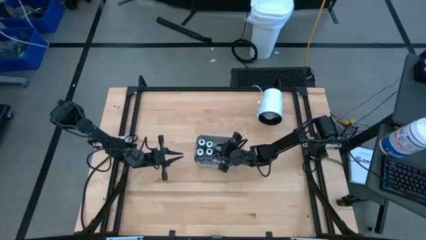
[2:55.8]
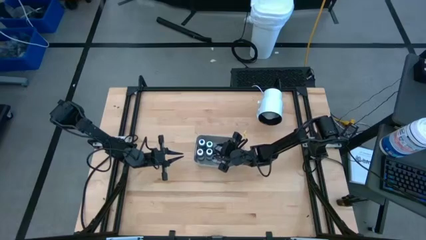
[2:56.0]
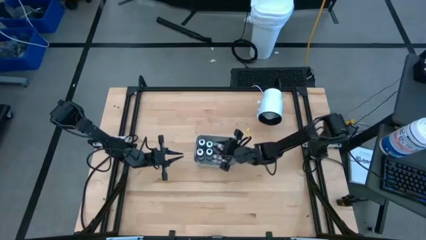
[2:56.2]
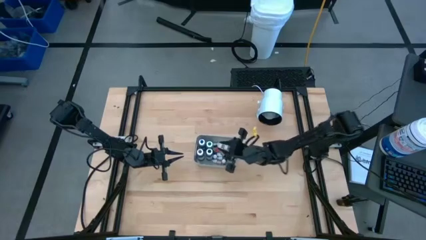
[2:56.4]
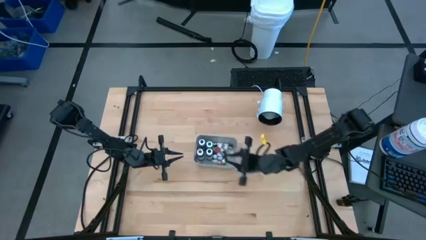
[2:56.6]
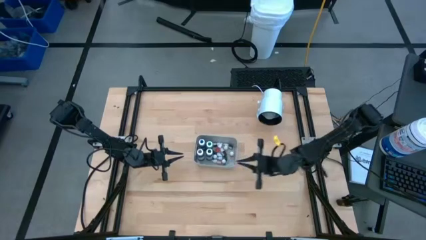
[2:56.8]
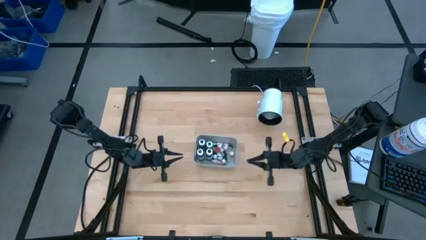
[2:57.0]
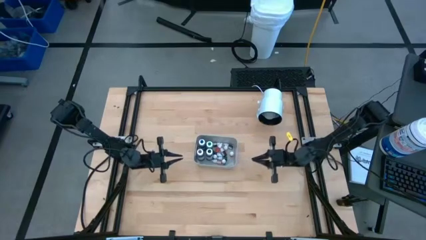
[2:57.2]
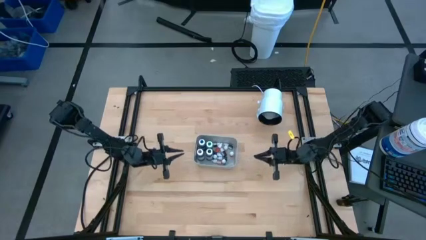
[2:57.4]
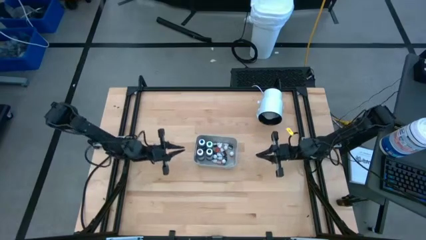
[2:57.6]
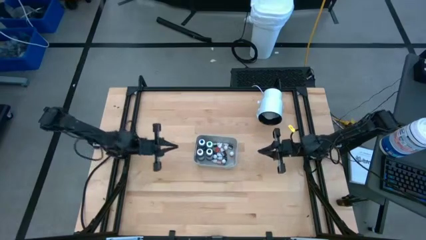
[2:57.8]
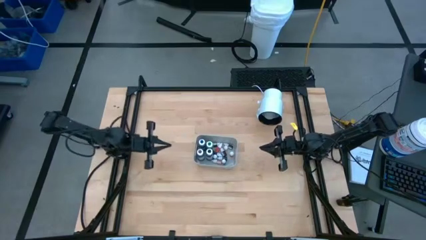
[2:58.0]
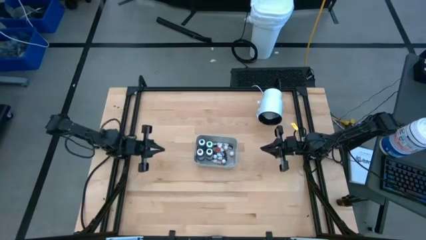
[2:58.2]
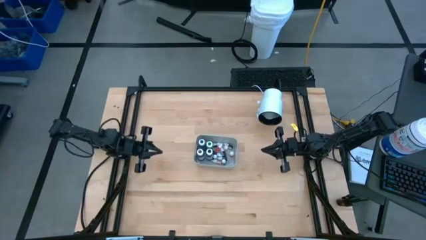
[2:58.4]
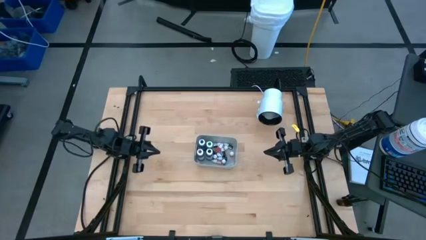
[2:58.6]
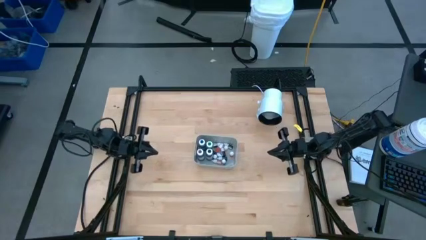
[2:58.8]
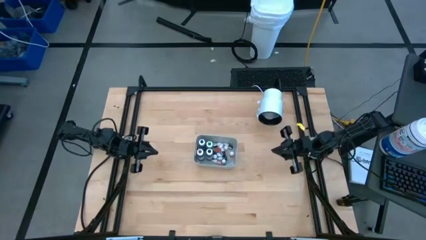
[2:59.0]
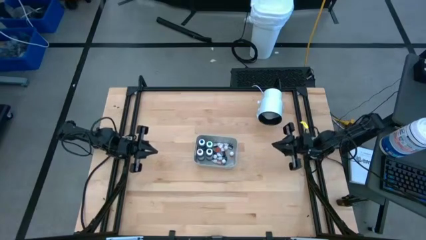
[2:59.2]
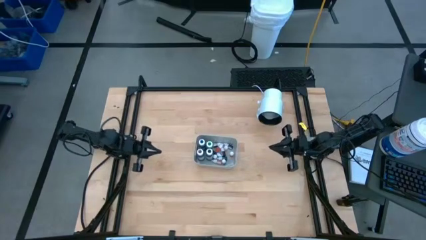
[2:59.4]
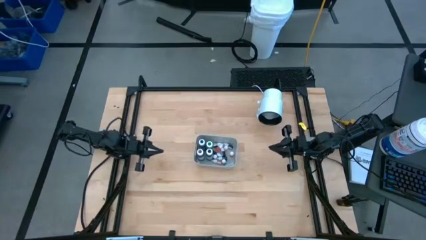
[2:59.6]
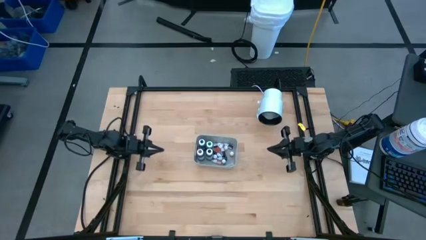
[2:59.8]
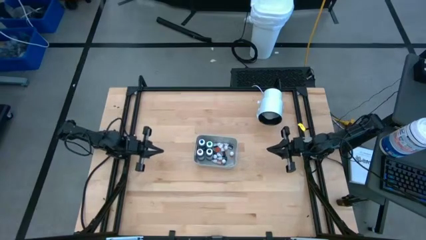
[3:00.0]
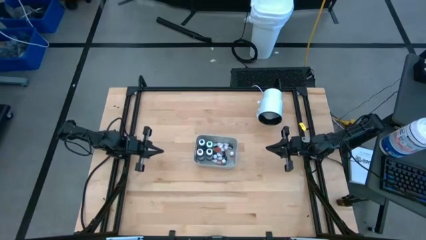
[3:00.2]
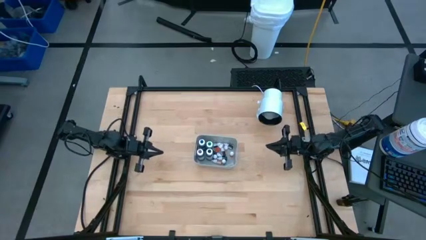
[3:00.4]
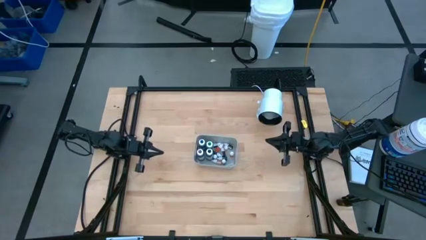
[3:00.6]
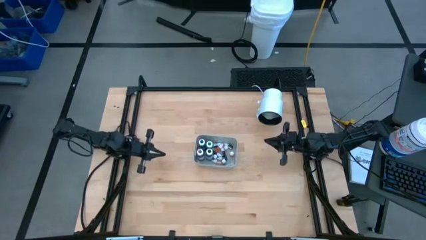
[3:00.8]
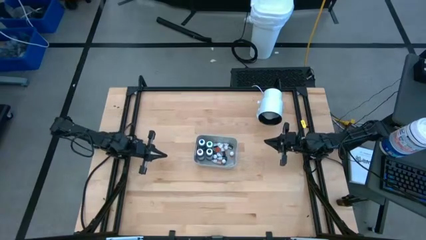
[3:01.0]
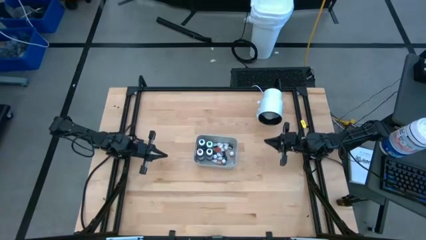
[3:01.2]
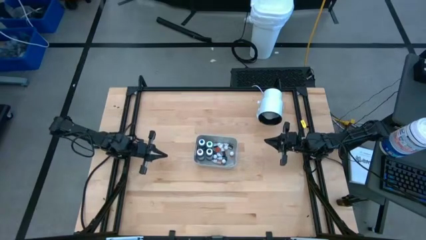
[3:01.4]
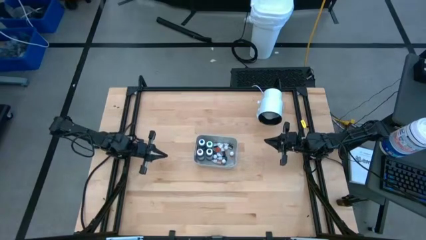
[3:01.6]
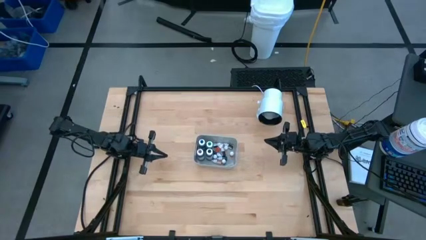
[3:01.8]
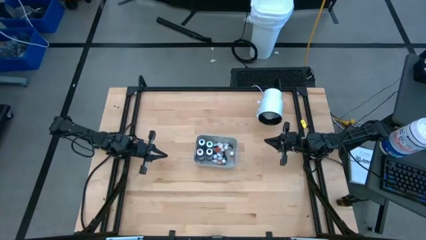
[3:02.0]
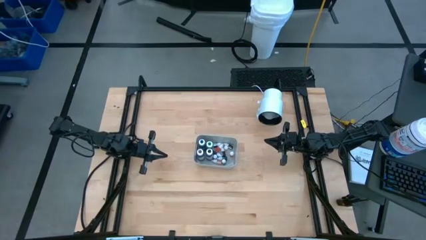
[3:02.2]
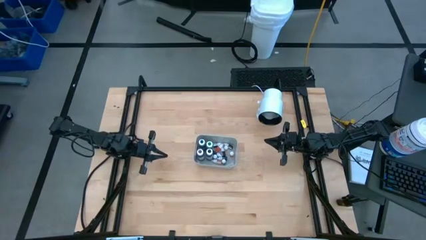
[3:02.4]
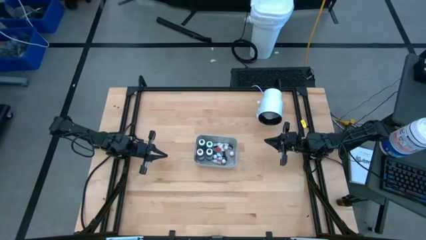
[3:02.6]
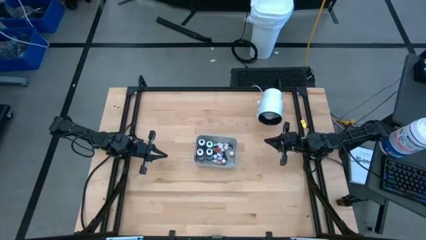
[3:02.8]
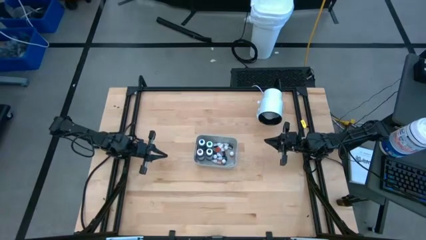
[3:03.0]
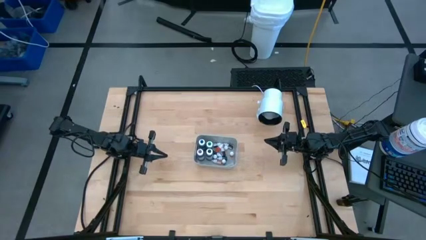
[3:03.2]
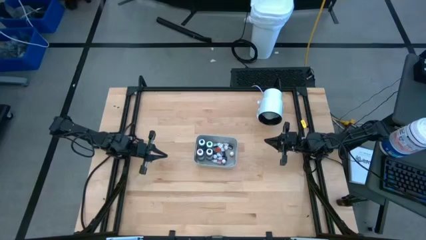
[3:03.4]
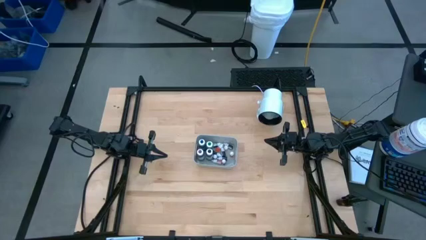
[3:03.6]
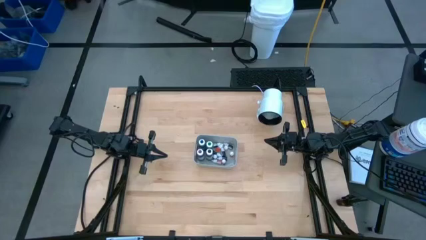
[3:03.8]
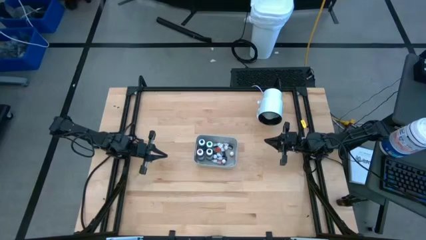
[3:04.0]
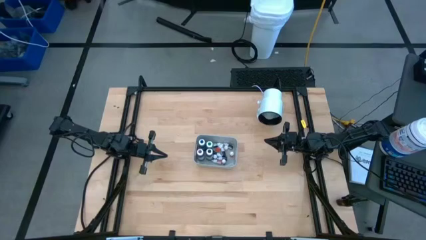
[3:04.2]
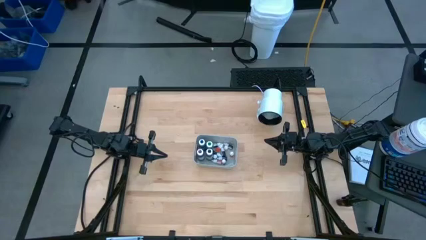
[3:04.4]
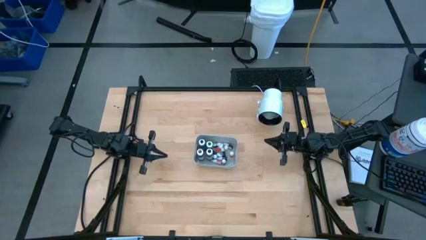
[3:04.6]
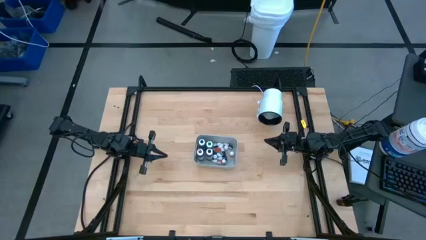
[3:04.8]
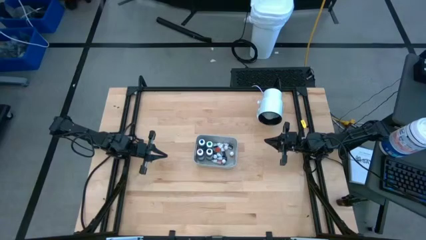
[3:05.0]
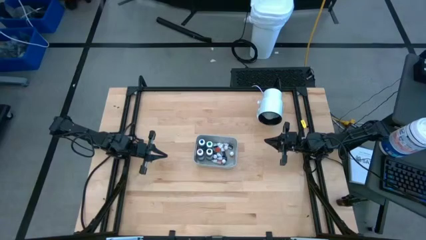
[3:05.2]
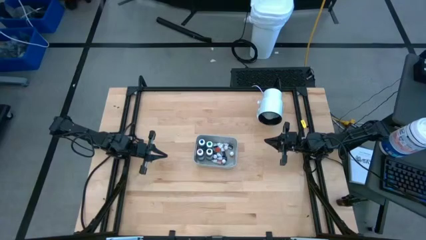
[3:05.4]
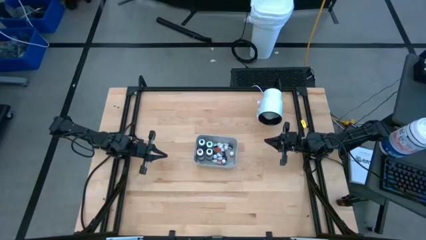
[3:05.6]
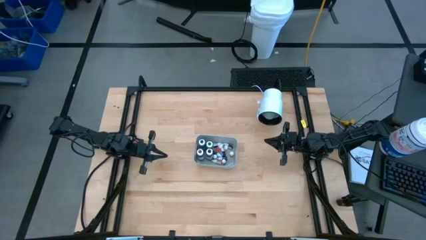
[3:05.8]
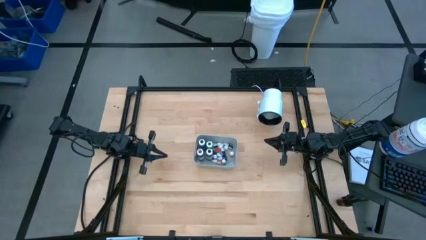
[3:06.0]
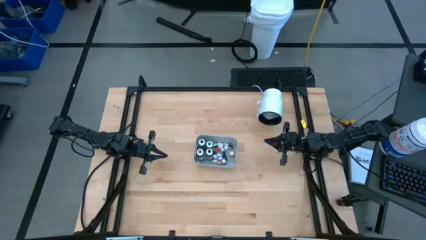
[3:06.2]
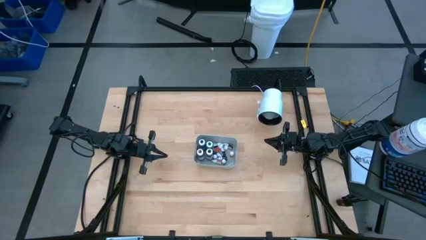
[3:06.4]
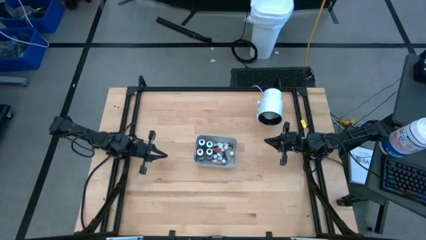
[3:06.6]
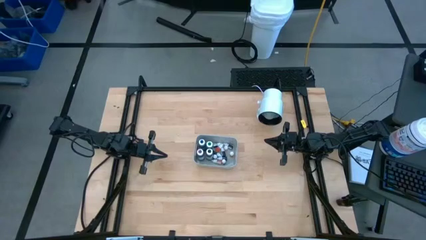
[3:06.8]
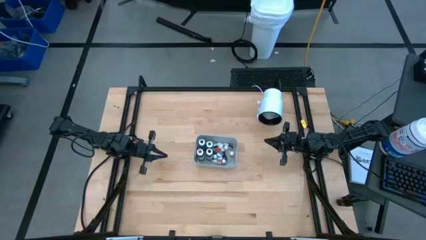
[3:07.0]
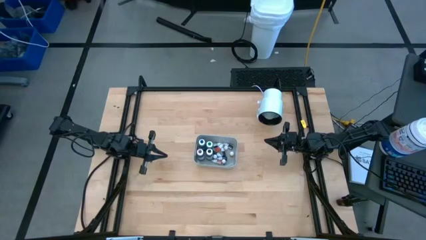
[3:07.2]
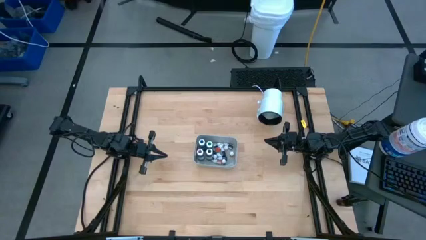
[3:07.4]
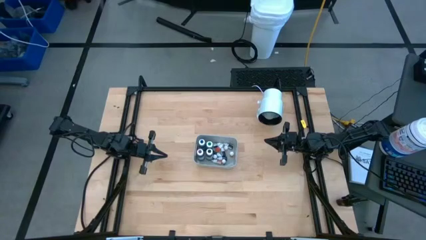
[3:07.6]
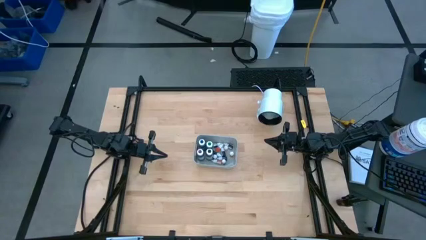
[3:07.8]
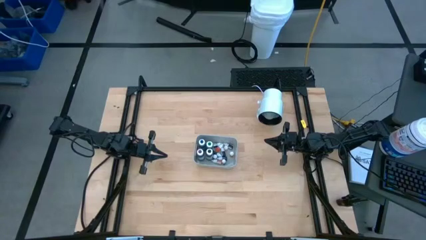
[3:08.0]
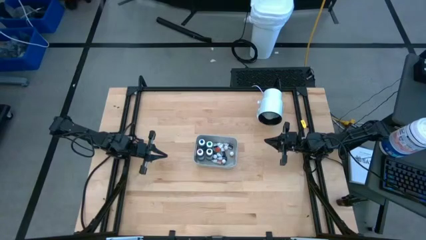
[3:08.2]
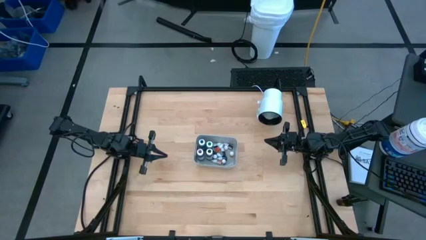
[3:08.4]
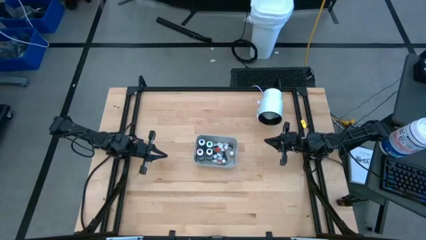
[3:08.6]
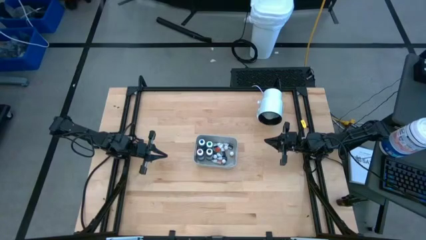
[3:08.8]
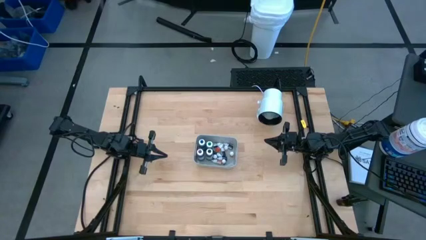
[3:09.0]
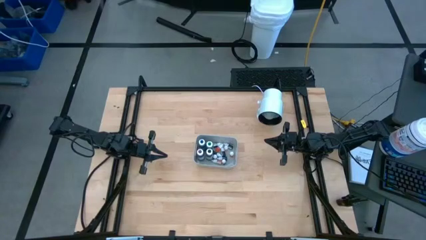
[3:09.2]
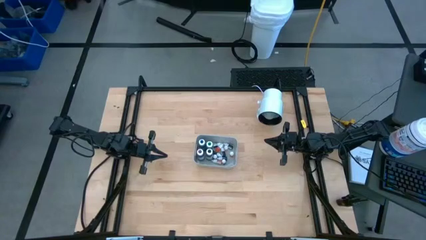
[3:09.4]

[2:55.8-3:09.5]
Task: Pick & Place food coloring
Return to Home Position
